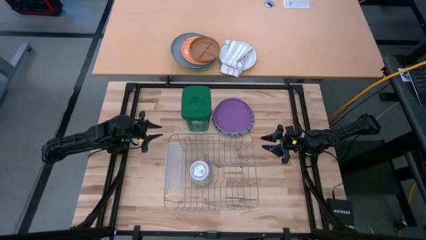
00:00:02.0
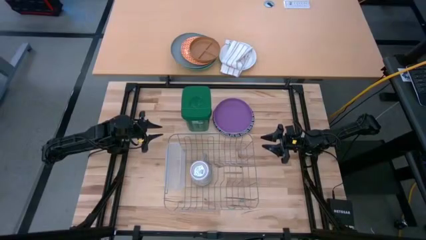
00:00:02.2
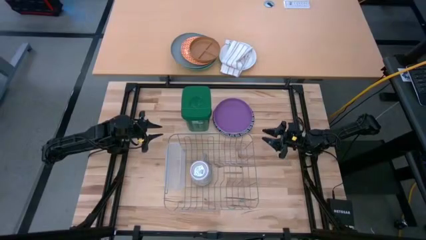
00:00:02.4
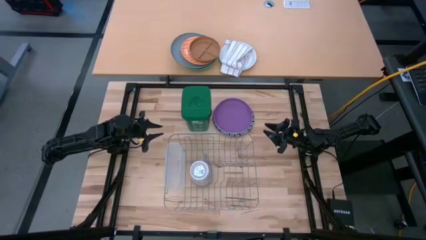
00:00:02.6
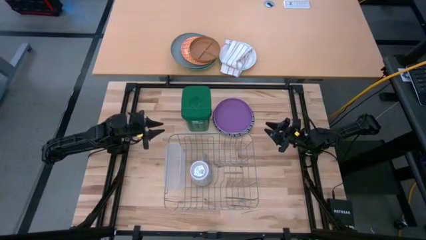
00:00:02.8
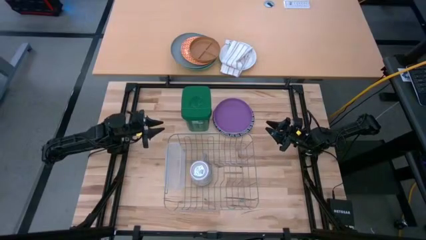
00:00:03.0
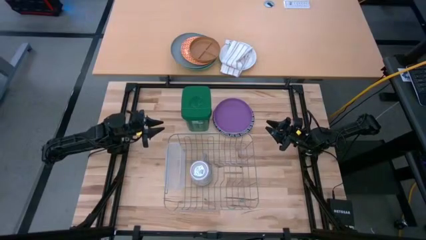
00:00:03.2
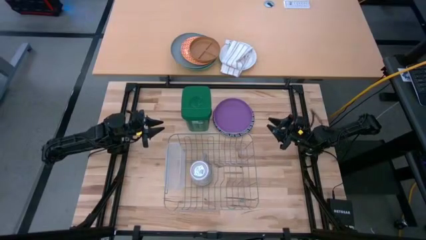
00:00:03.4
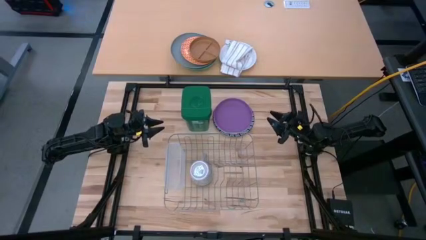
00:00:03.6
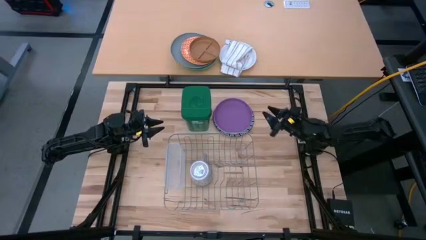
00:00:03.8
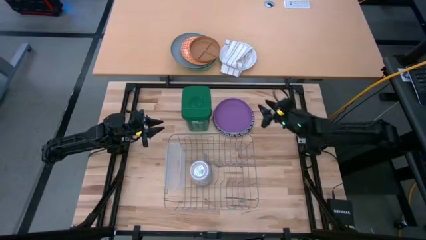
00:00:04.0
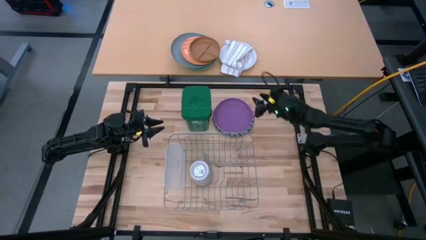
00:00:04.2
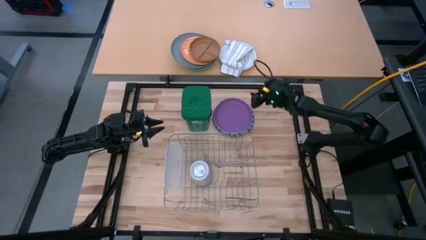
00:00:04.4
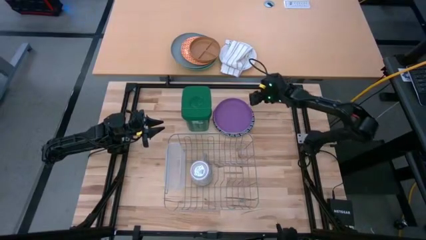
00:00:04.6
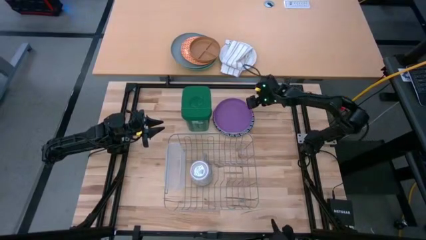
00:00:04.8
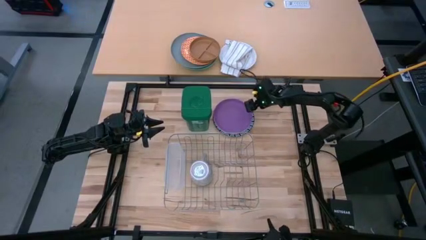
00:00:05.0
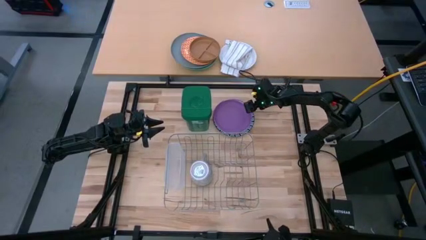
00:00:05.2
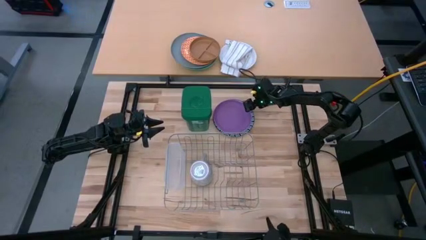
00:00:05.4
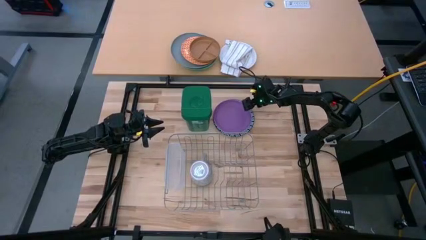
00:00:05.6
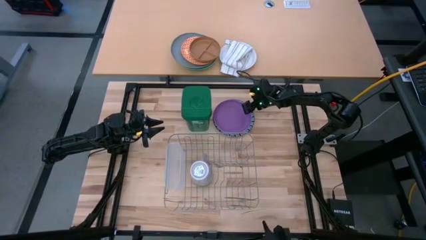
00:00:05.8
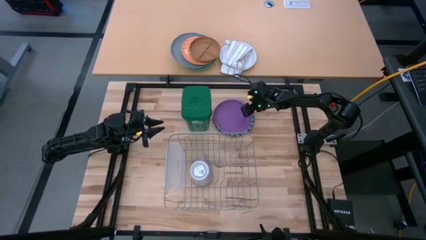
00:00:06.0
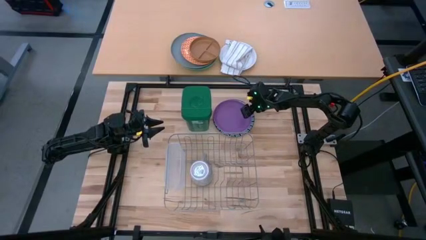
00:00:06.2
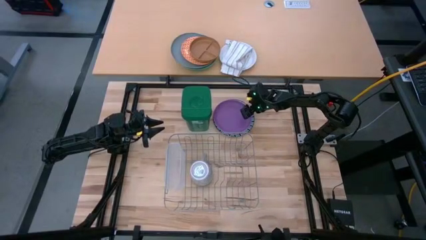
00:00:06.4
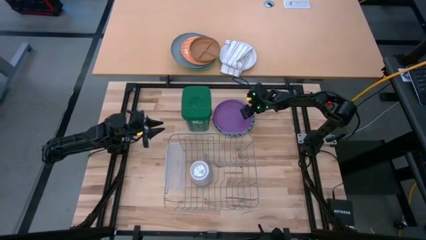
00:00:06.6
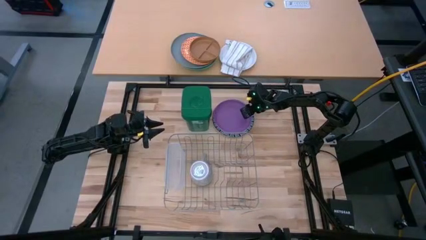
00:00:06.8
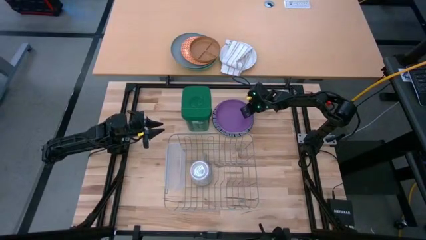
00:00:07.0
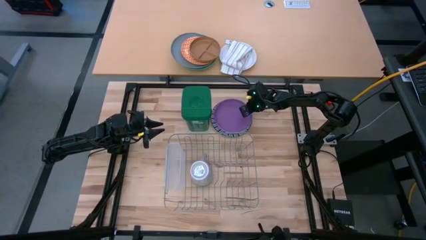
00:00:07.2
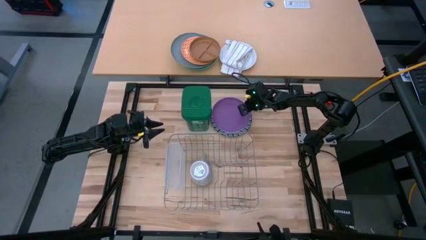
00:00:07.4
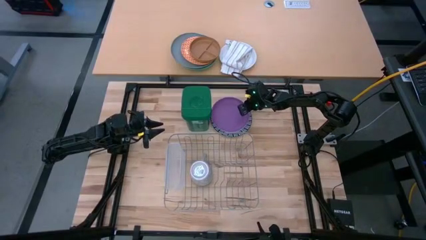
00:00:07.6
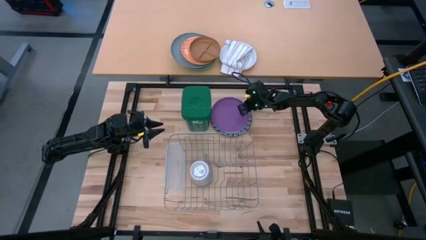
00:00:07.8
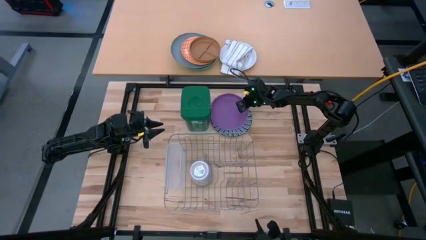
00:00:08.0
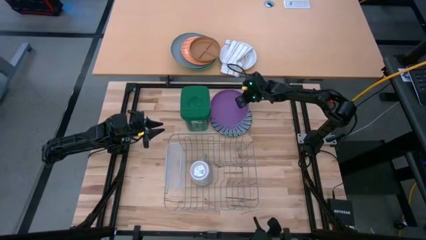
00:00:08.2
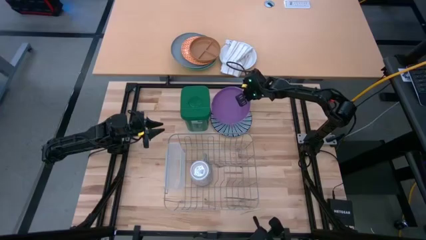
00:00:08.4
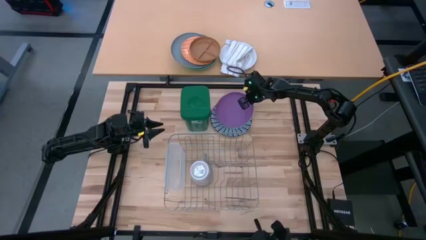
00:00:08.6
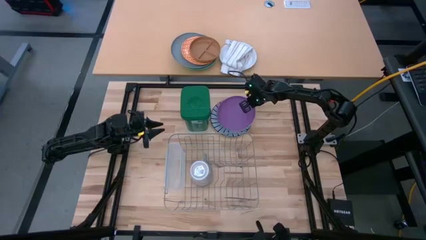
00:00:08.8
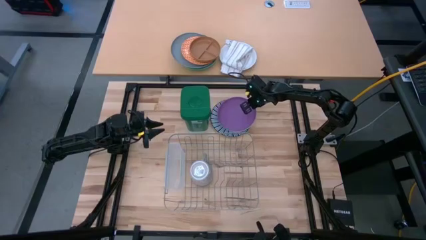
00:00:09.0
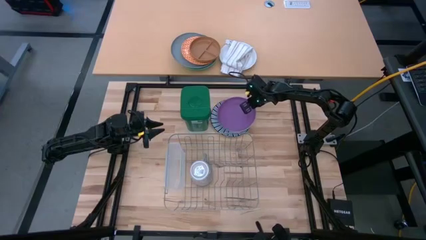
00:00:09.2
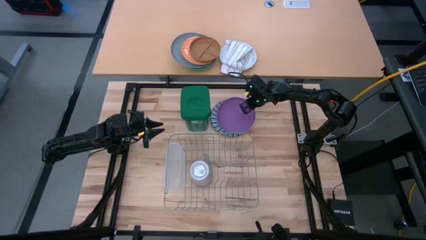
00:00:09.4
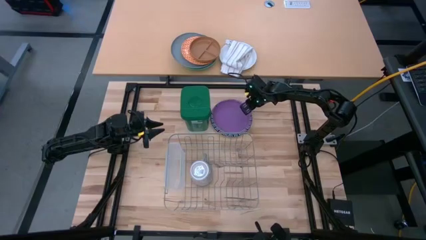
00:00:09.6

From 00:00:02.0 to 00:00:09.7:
Task: Sort dishes
Put the purple plate into the dish rack

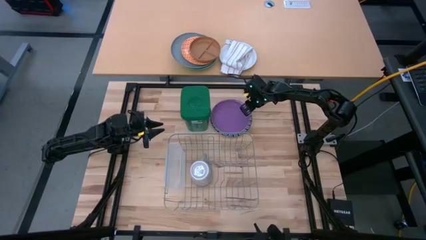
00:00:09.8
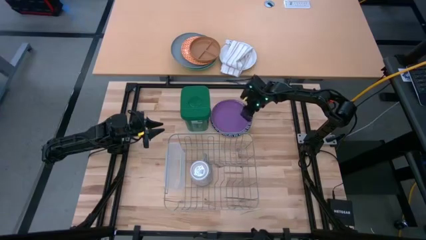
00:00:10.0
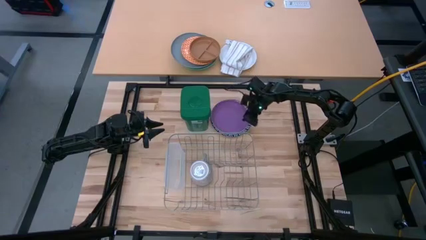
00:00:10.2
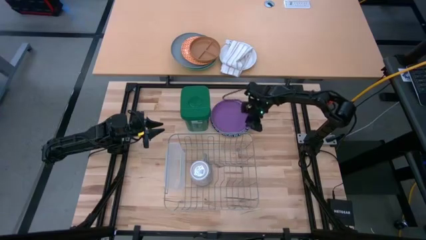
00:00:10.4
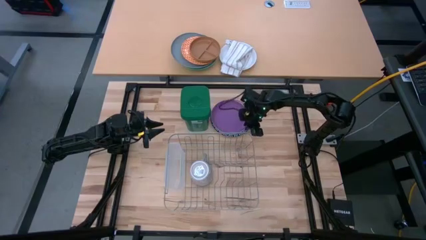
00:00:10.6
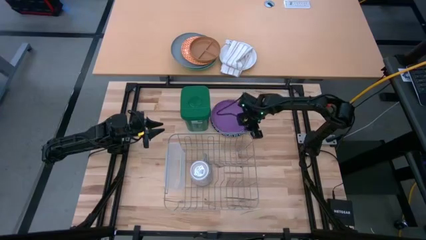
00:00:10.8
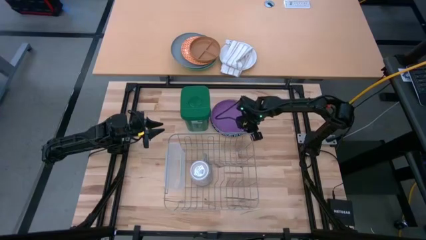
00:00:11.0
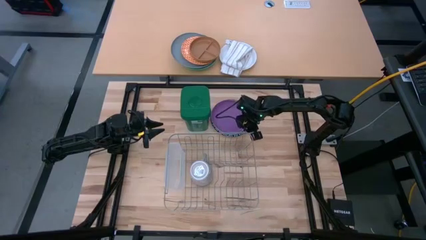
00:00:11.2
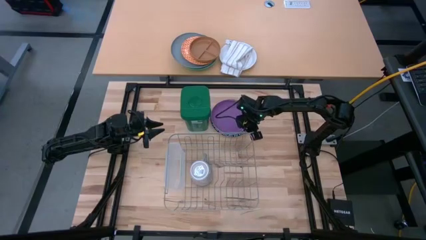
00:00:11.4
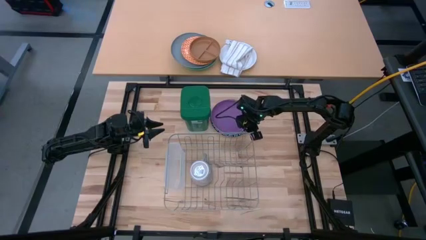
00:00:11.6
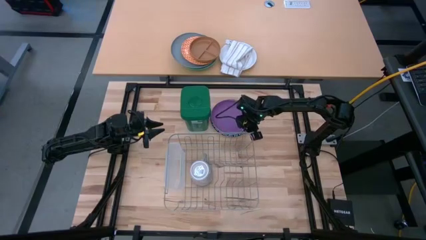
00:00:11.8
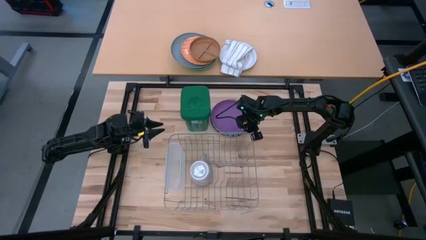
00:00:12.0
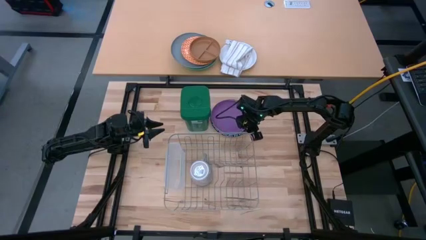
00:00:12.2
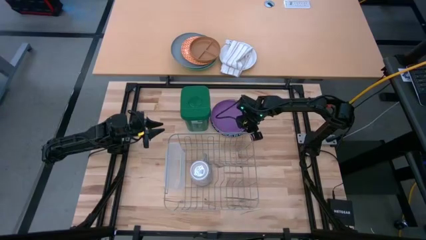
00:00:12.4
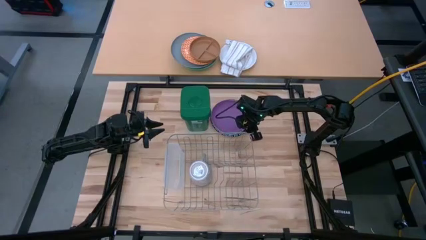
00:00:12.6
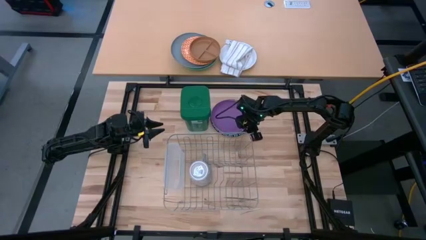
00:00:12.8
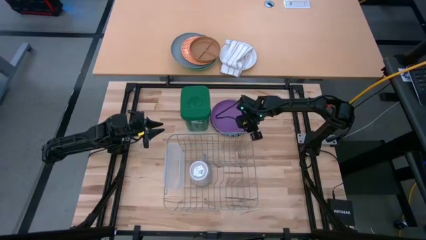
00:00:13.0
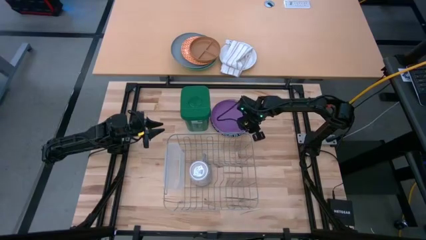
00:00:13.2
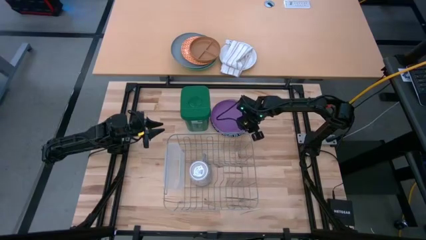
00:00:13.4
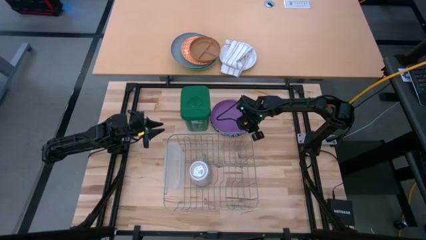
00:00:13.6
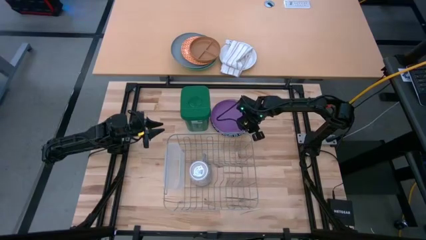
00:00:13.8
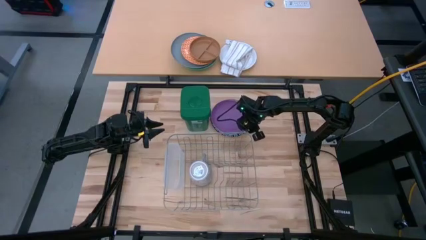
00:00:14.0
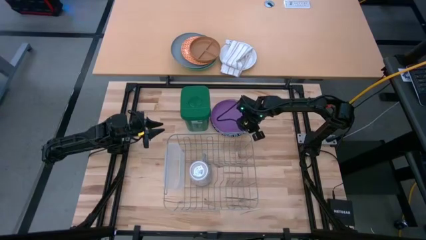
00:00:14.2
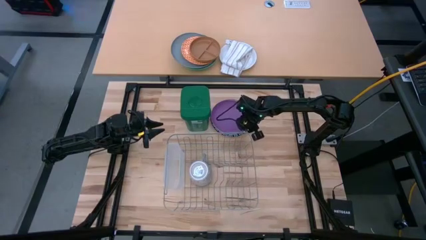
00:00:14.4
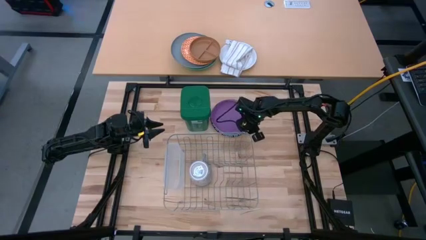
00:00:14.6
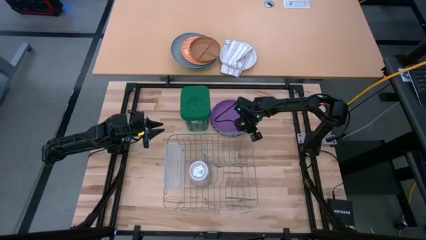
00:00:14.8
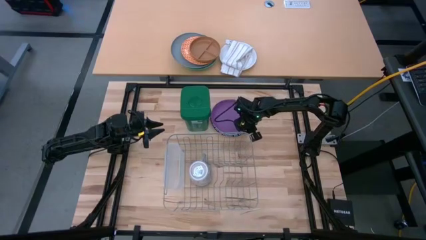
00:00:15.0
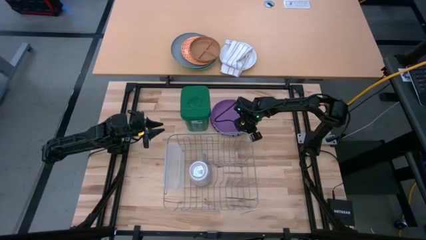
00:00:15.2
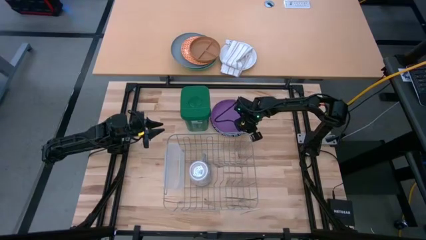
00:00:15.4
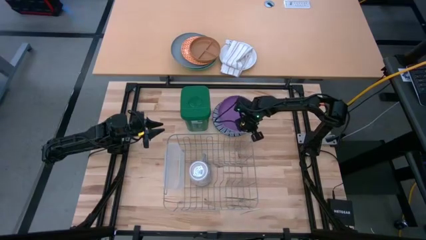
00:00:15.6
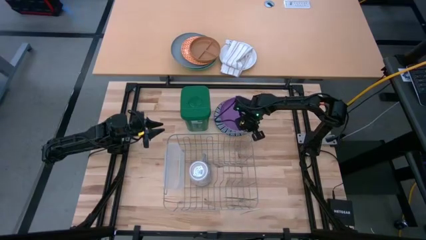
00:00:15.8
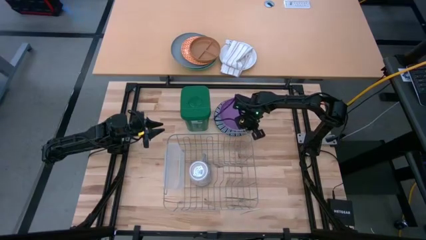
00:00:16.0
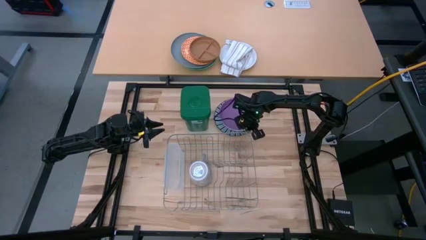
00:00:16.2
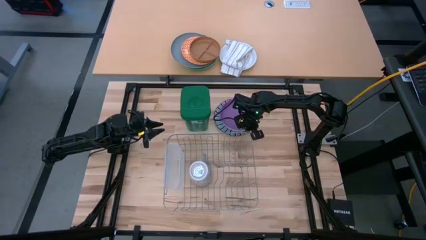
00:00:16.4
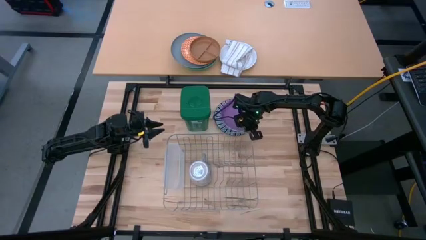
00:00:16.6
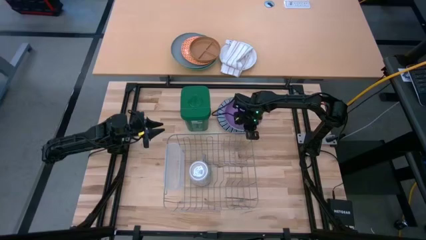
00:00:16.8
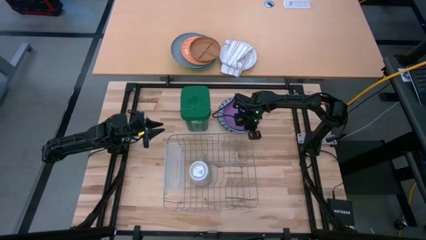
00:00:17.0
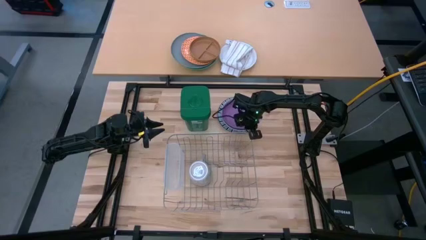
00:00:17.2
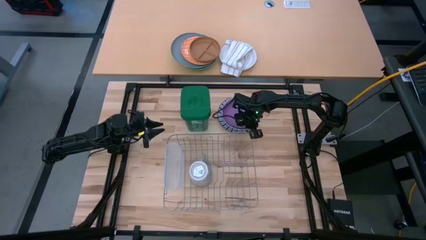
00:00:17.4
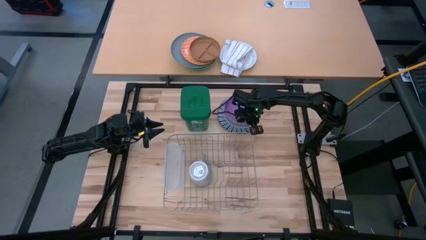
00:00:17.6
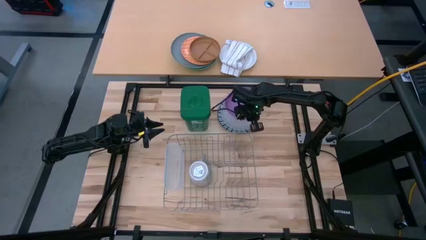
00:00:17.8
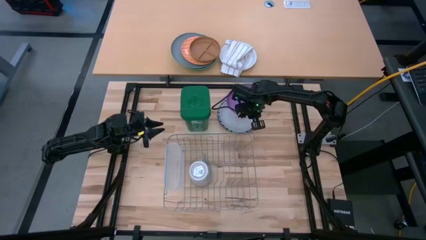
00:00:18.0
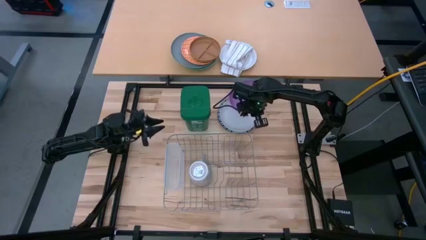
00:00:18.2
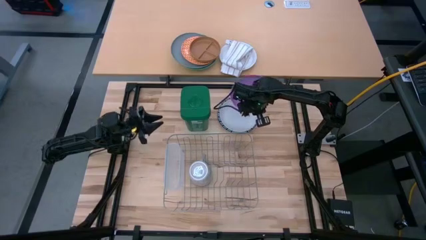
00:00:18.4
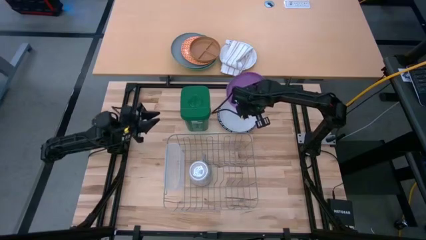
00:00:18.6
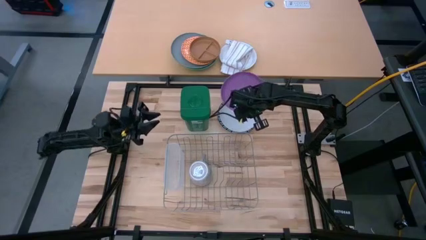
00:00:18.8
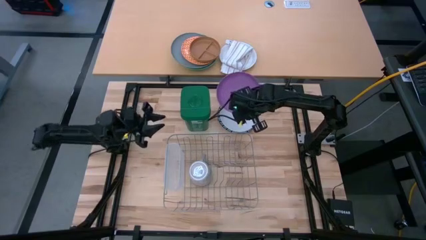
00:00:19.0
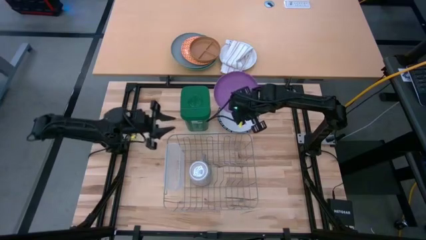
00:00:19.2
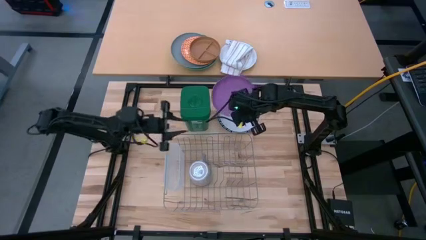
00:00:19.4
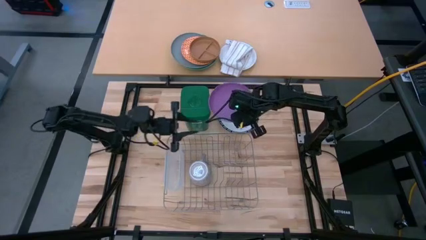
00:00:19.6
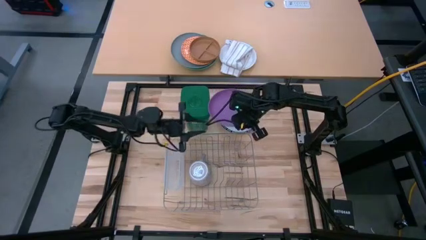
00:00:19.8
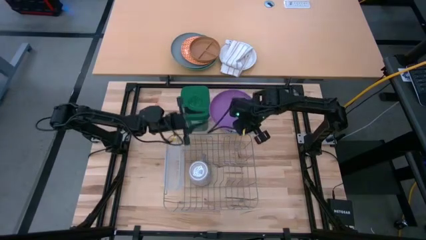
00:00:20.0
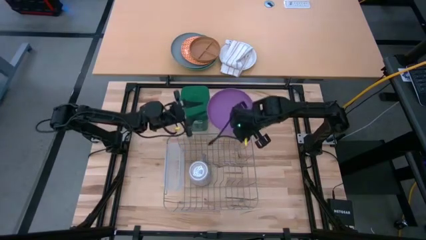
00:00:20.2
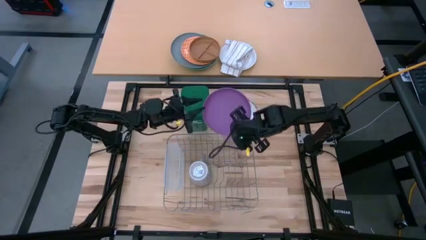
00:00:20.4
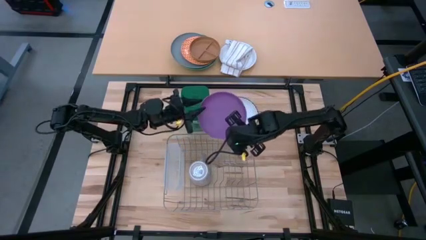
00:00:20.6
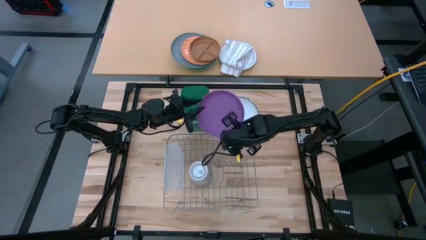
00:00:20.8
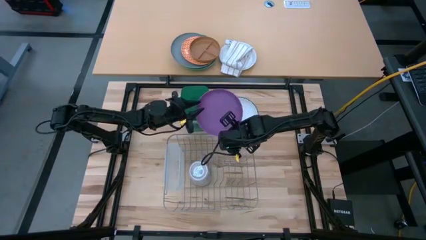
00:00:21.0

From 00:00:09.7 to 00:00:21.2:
Put the purple plate into the dish rack
